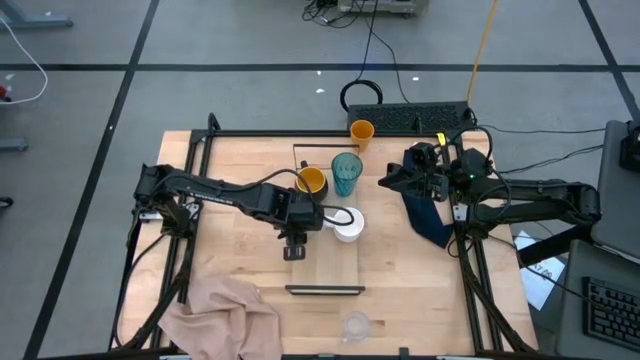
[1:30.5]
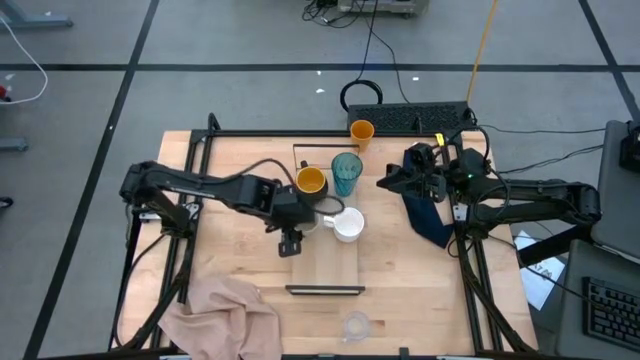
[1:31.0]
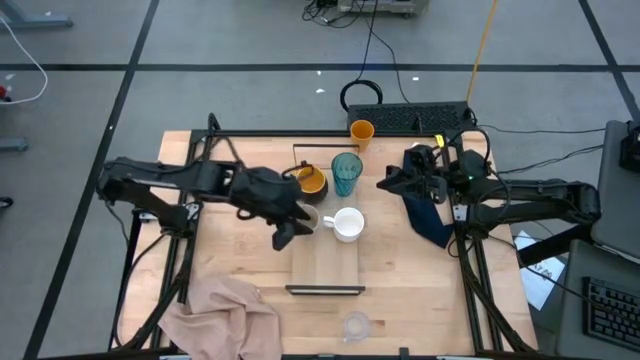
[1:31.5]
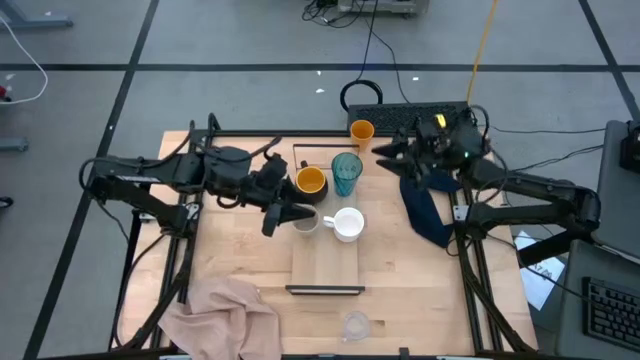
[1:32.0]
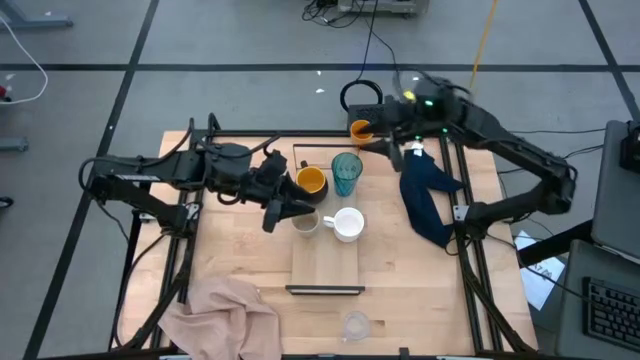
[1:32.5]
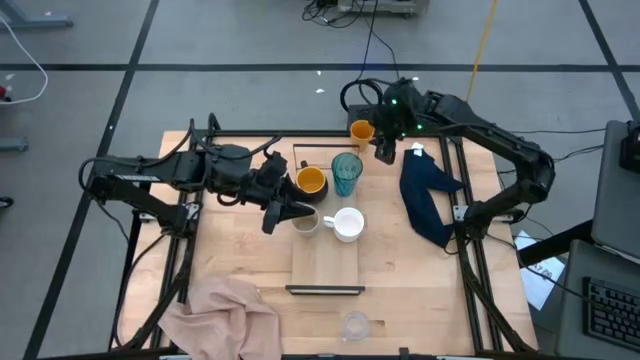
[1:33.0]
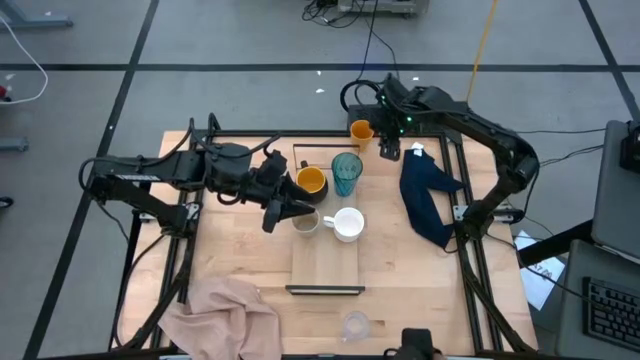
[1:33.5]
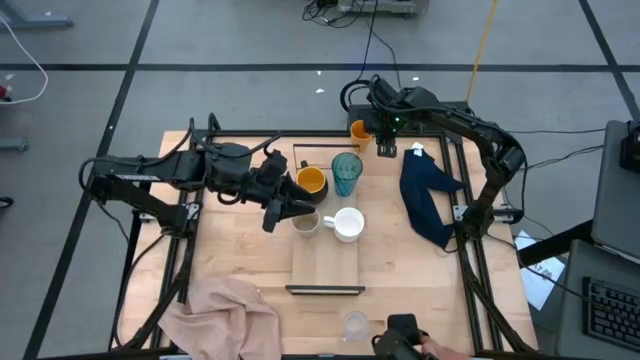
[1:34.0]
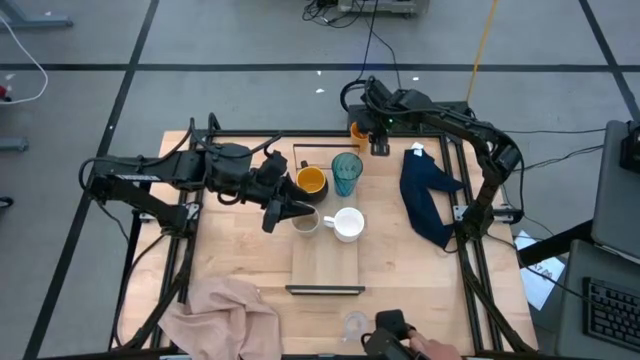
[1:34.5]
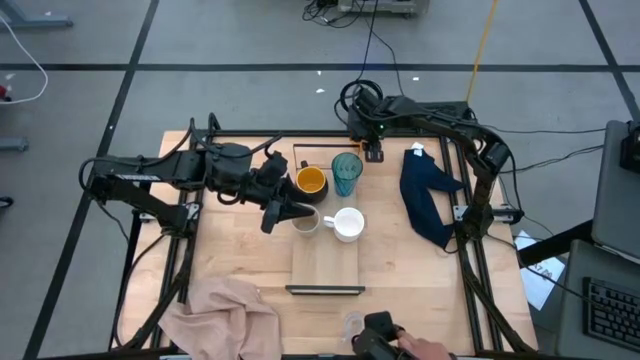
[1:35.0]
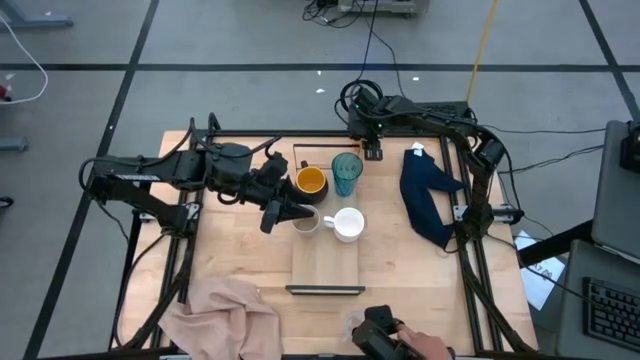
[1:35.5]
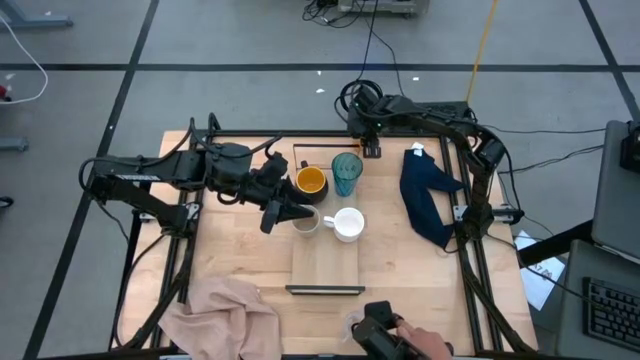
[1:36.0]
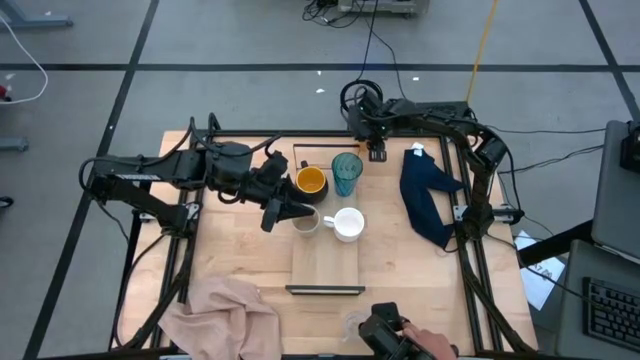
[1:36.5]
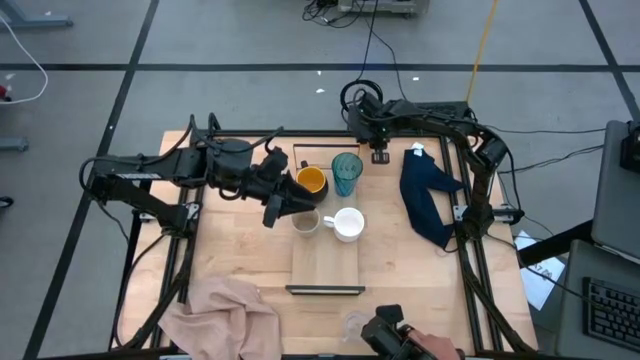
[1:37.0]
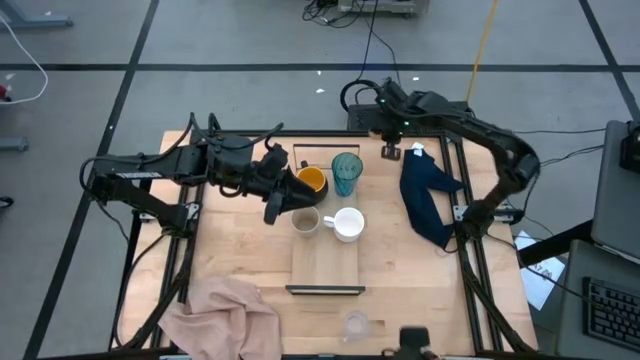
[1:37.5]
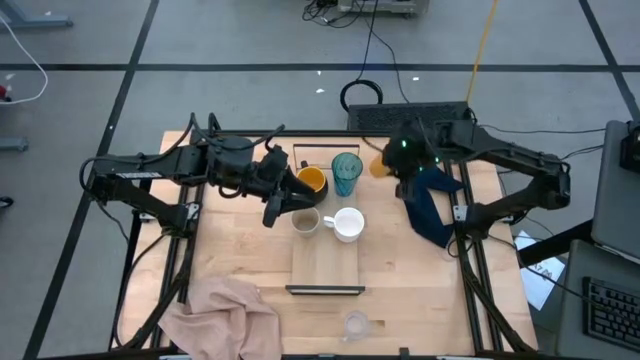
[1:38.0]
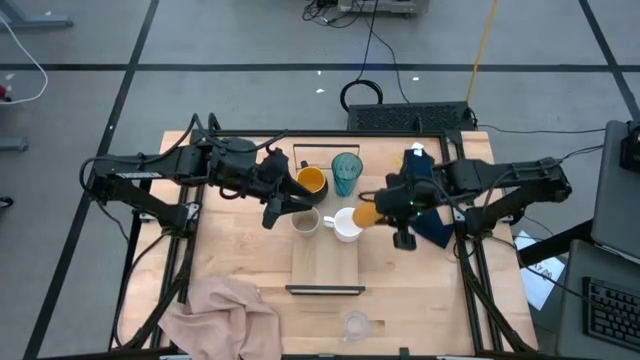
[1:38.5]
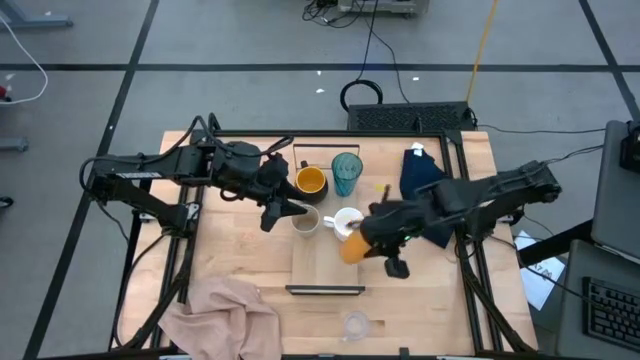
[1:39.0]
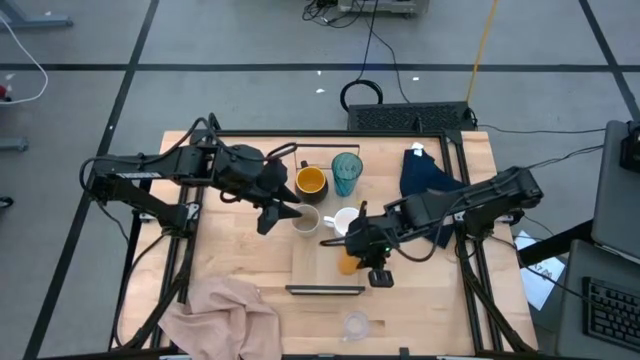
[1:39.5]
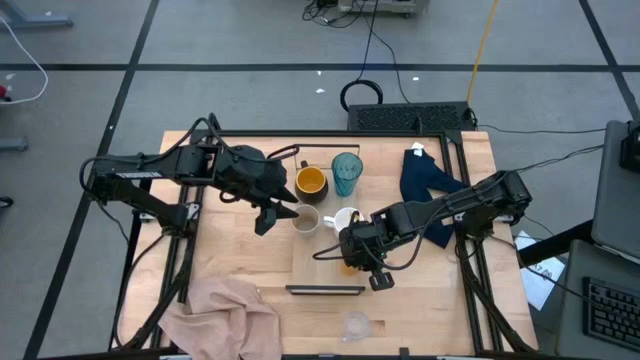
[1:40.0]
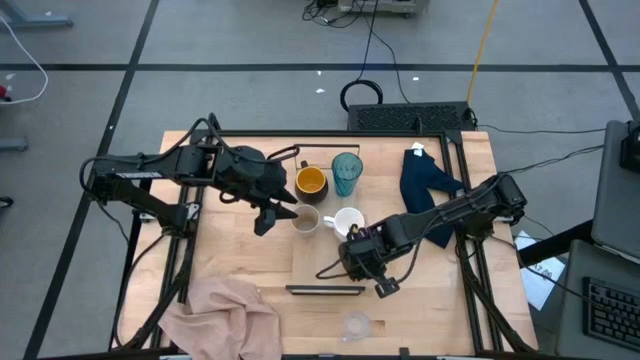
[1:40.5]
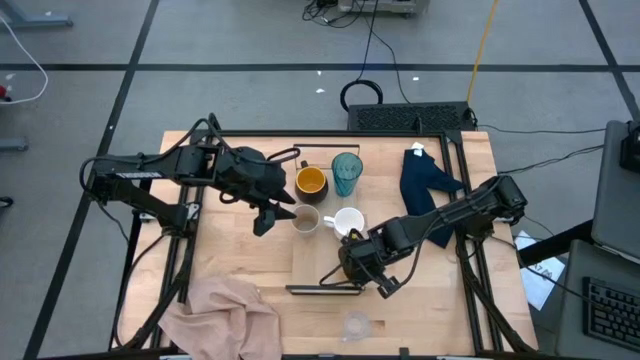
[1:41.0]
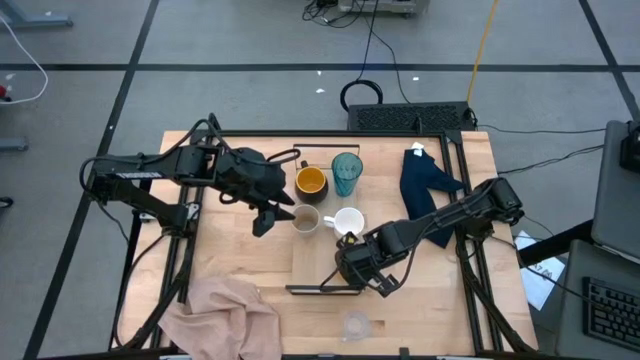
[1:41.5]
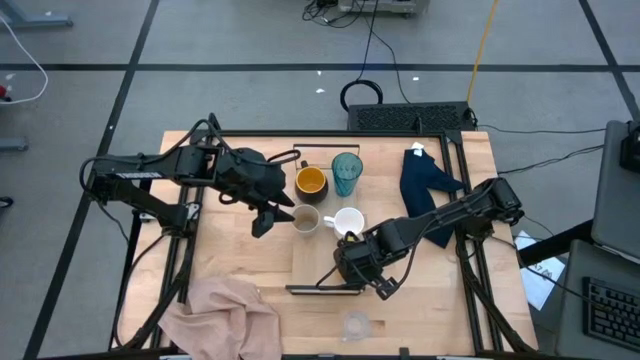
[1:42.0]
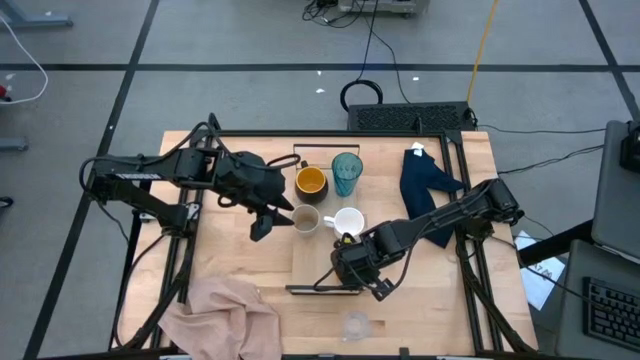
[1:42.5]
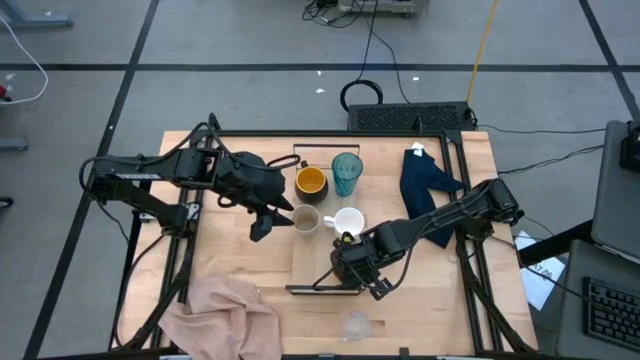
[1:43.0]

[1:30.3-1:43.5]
Task: Stack small to large cups/mugs on shelf
Put the yellow cup on the shelf

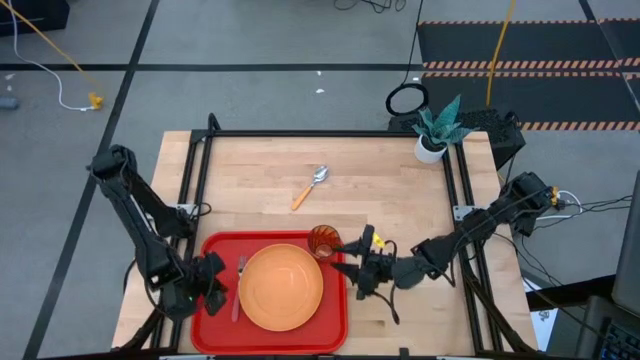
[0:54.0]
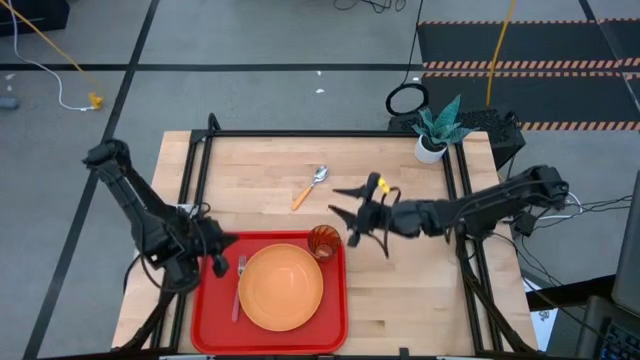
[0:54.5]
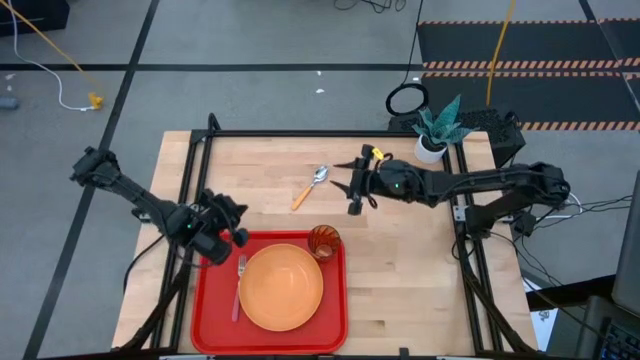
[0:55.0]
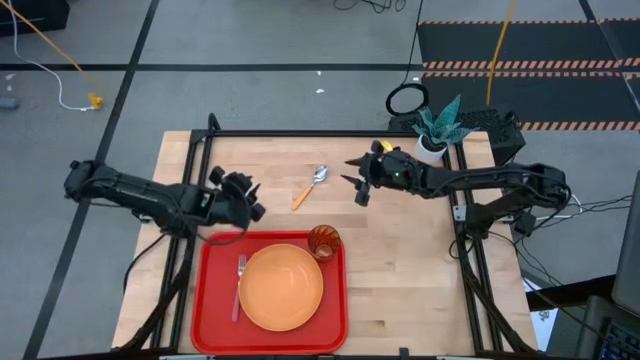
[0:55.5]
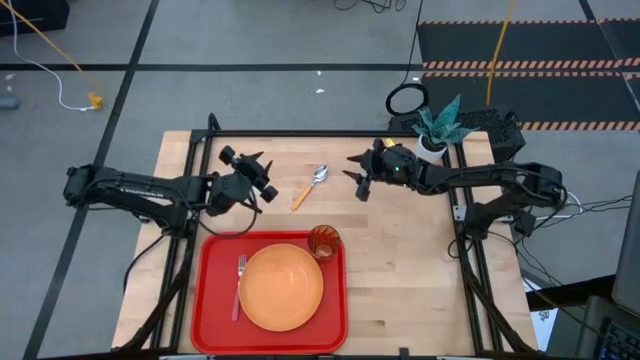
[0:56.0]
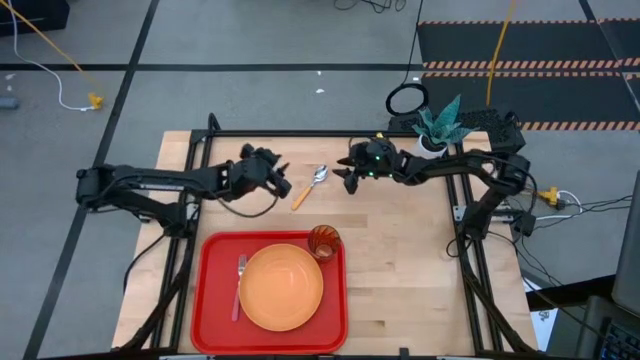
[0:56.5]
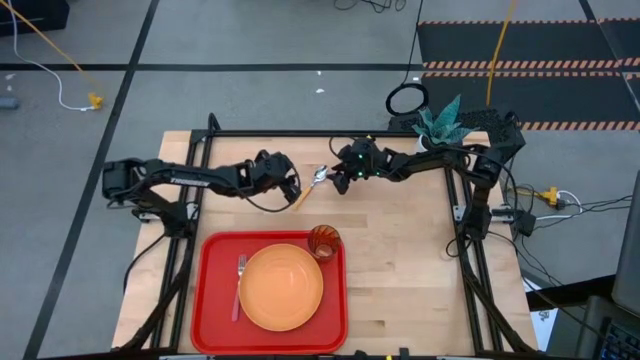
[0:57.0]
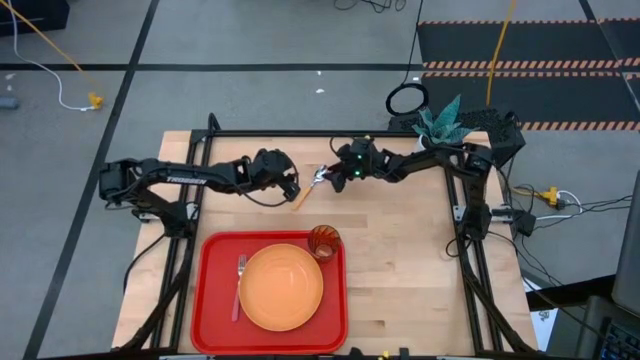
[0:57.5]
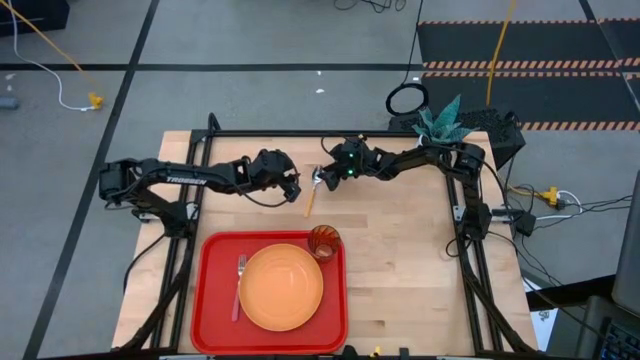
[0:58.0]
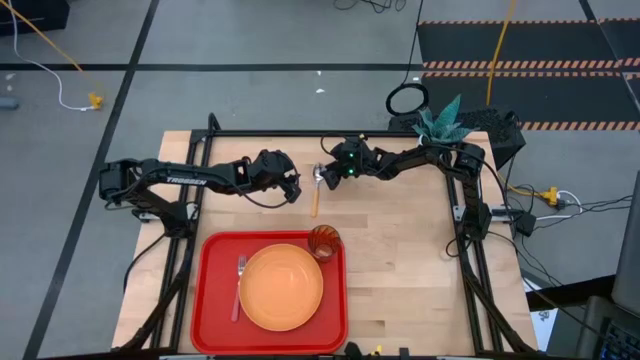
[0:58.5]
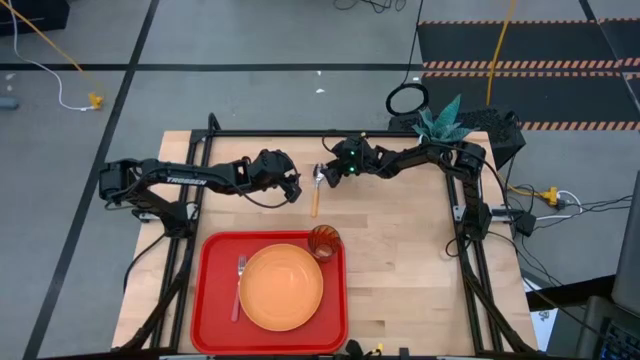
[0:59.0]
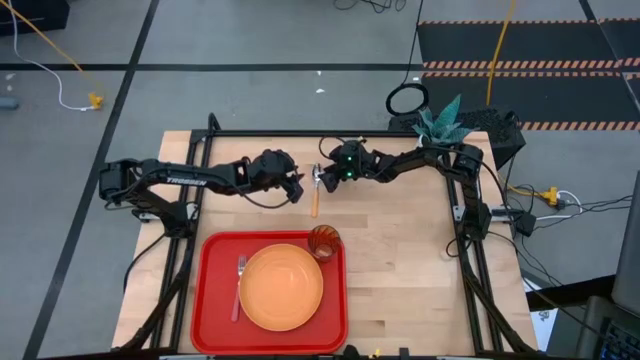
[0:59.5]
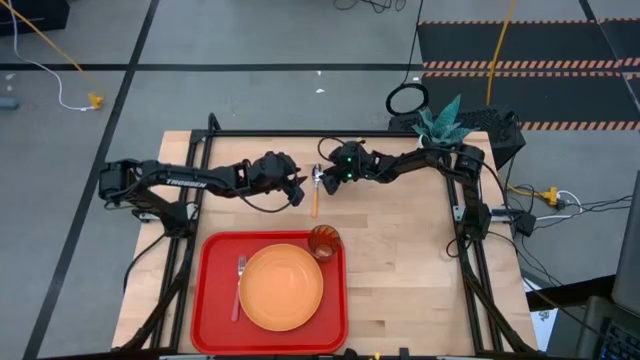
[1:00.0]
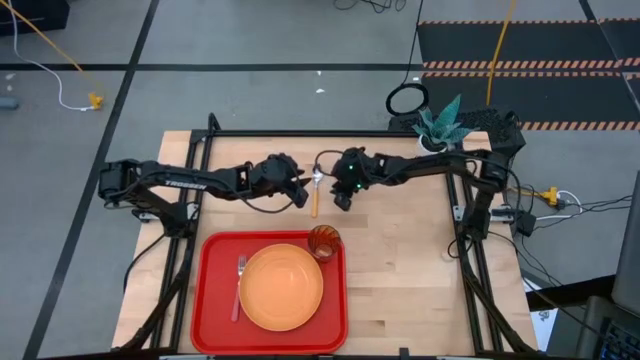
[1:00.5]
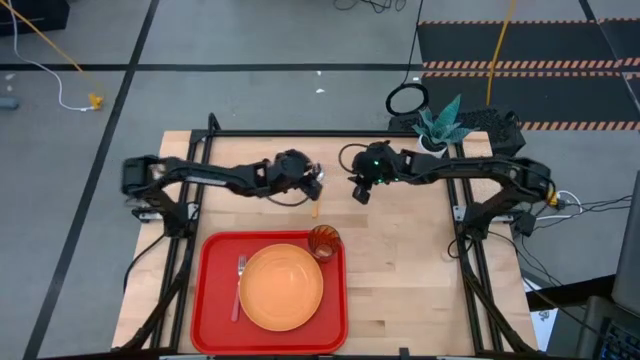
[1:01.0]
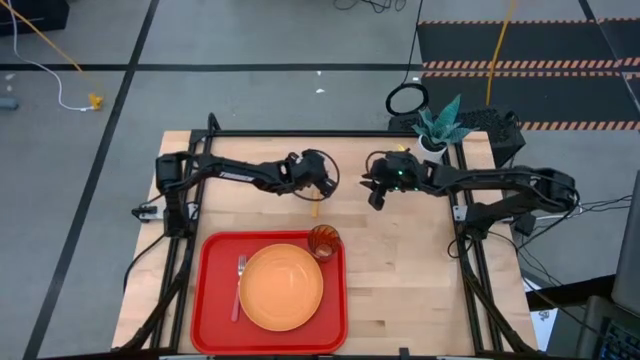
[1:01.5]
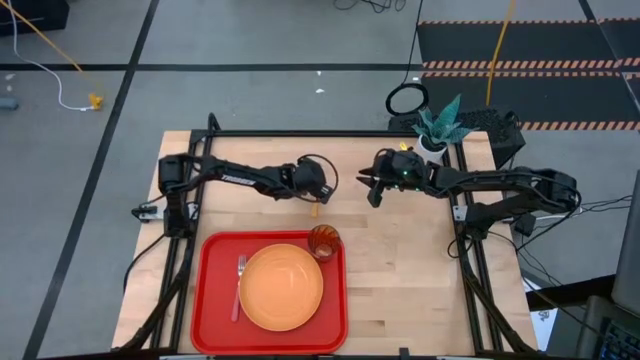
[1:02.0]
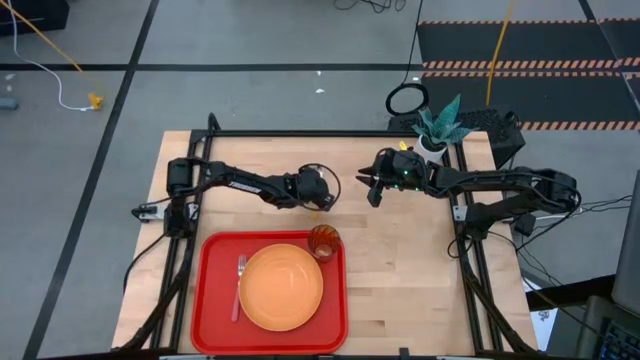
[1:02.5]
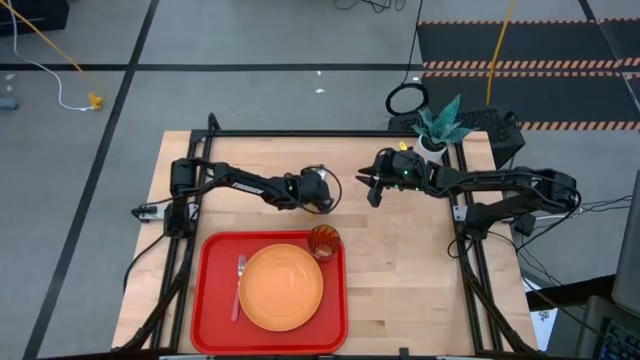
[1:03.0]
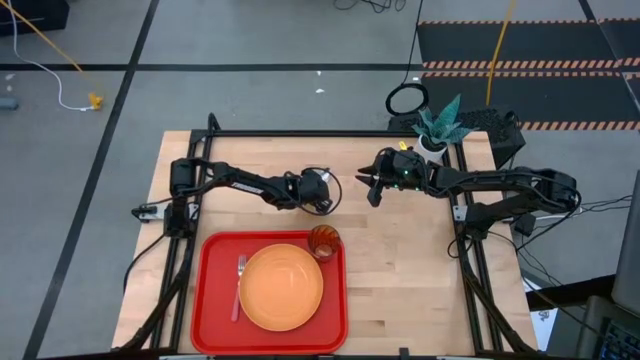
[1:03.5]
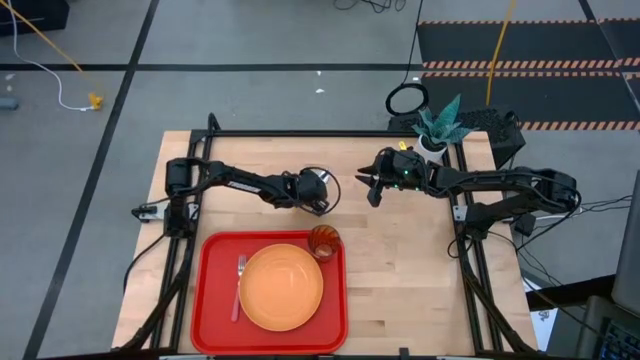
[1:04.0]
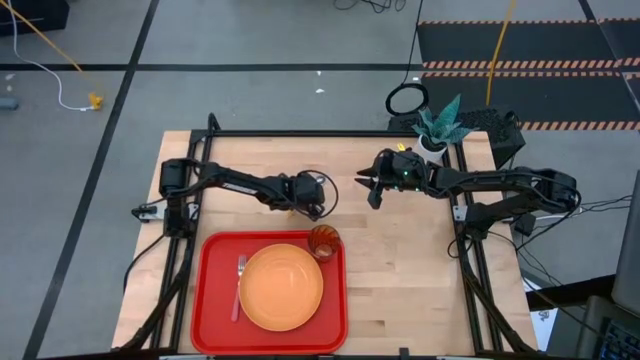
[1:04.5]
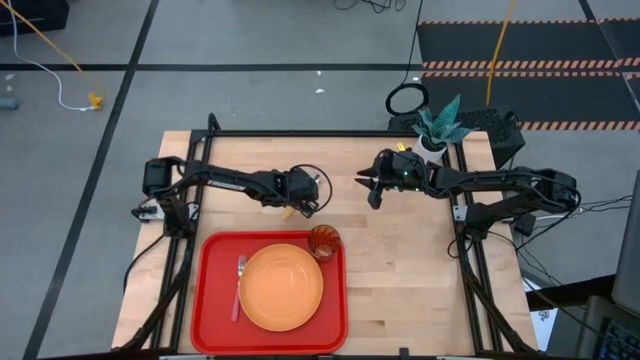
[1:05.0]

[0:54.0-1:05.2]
Task: Pick and place plate/cup/fork/spoon on tray
Put the orange spoon on the red serving tray to the left of the pink fork
